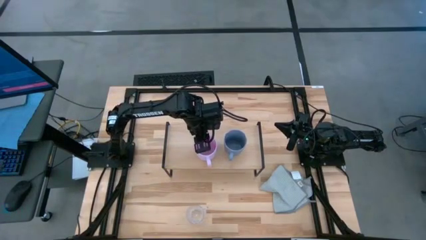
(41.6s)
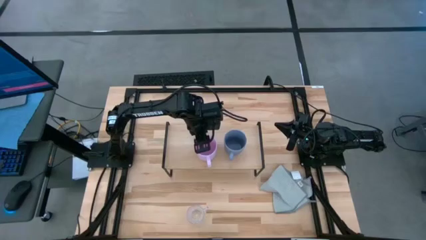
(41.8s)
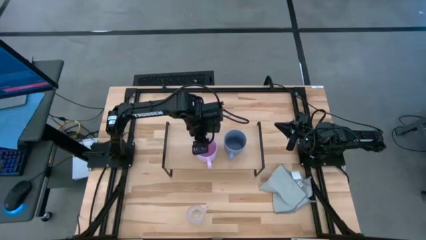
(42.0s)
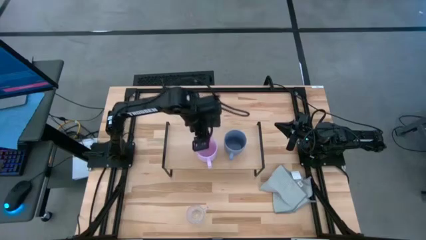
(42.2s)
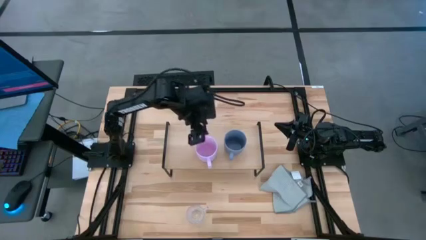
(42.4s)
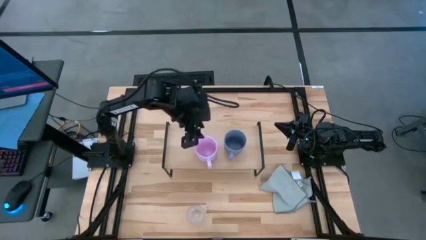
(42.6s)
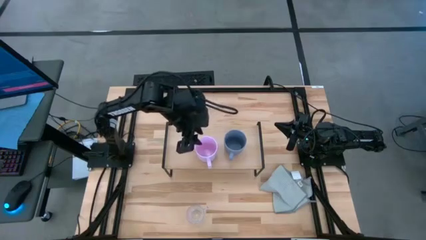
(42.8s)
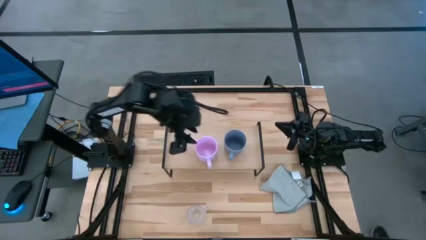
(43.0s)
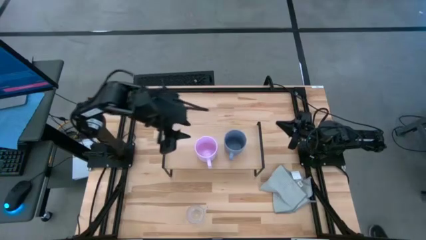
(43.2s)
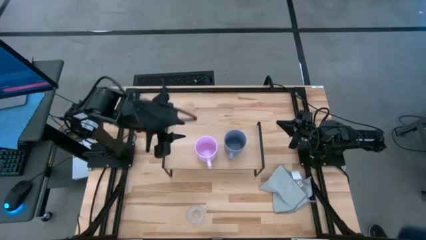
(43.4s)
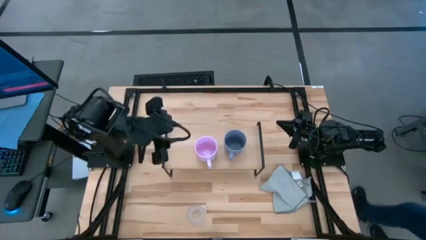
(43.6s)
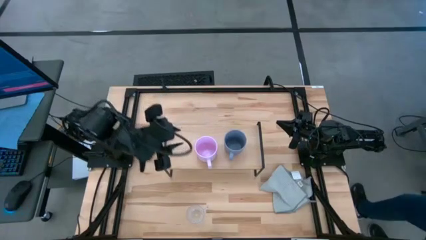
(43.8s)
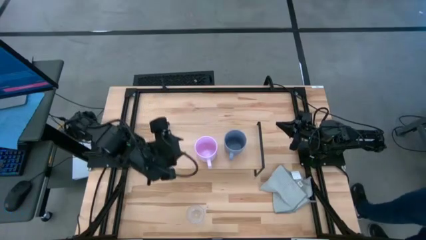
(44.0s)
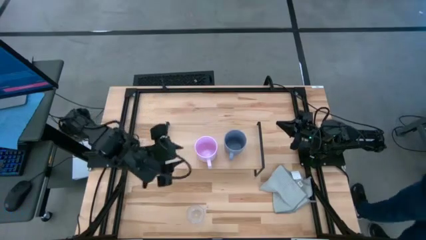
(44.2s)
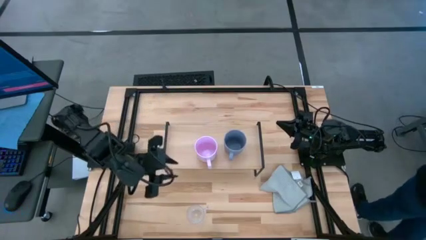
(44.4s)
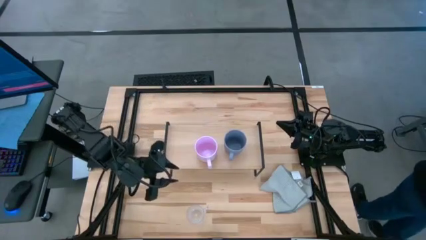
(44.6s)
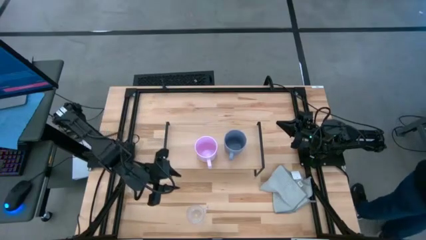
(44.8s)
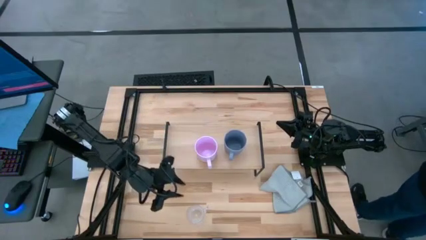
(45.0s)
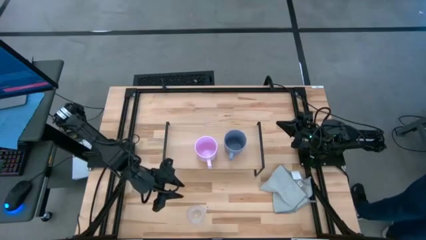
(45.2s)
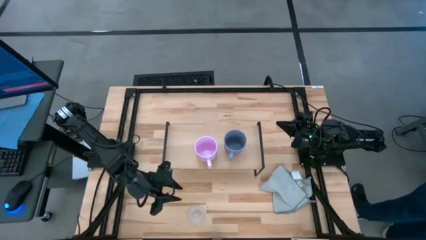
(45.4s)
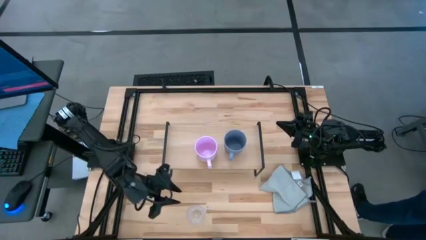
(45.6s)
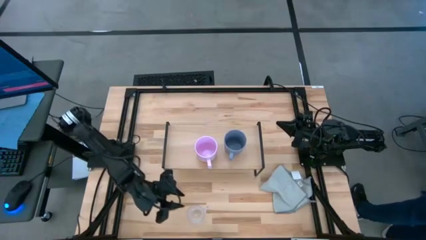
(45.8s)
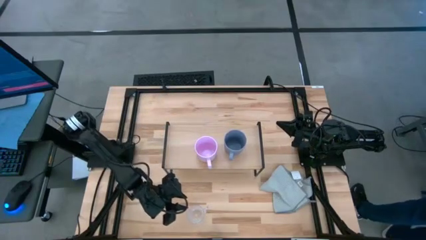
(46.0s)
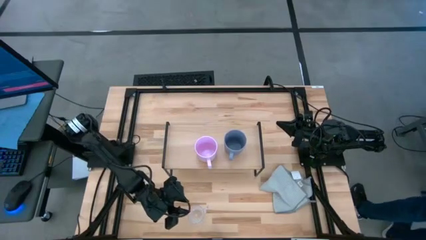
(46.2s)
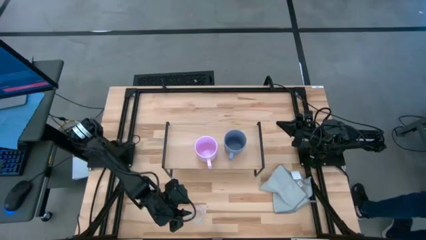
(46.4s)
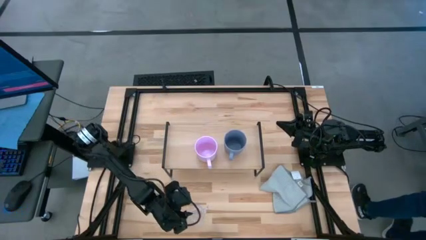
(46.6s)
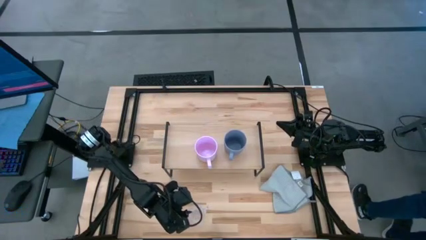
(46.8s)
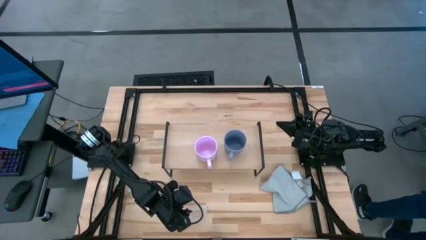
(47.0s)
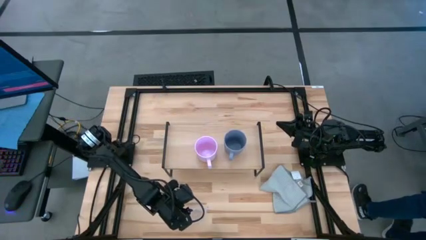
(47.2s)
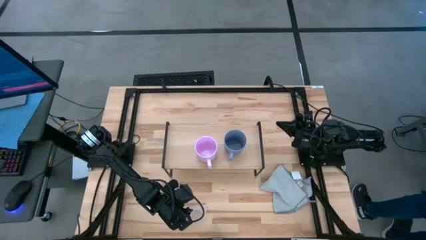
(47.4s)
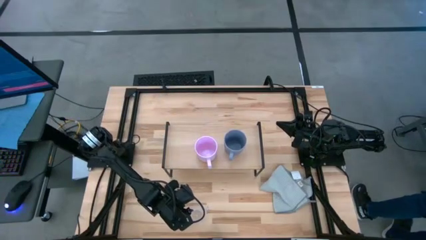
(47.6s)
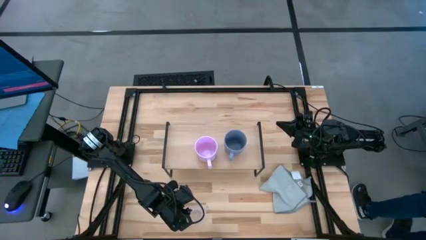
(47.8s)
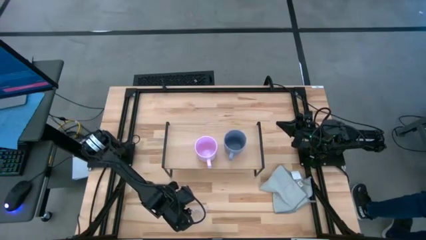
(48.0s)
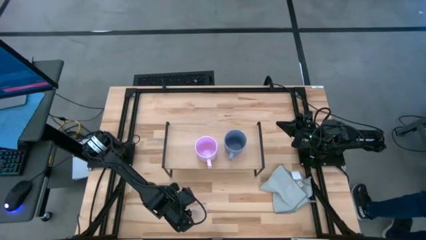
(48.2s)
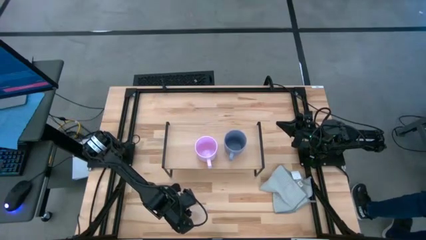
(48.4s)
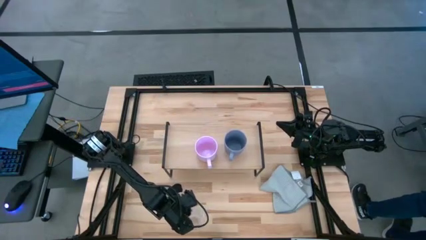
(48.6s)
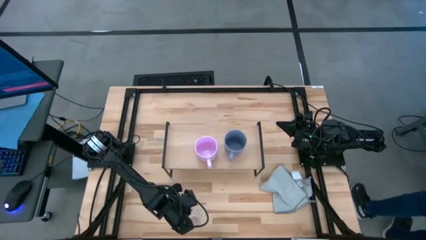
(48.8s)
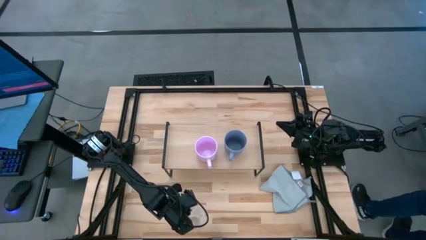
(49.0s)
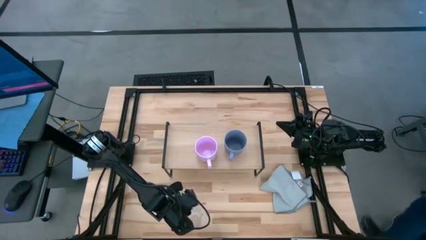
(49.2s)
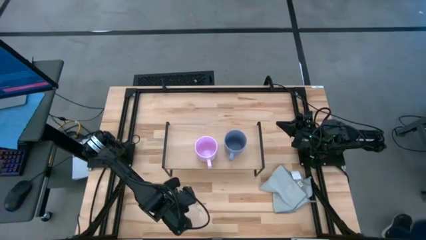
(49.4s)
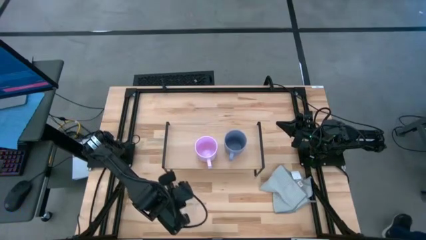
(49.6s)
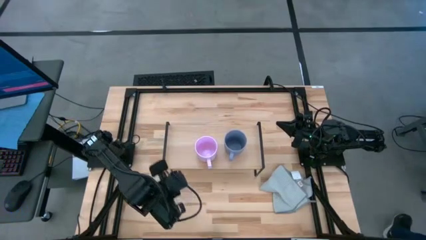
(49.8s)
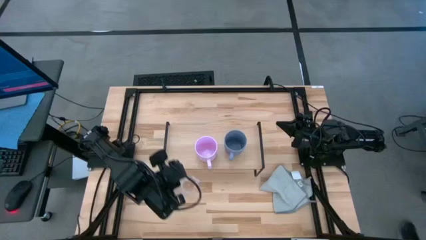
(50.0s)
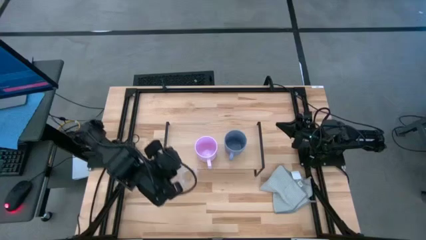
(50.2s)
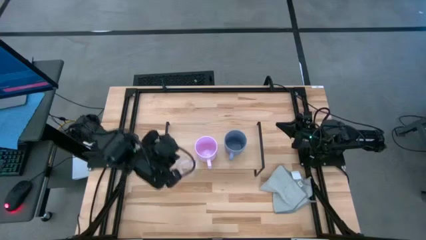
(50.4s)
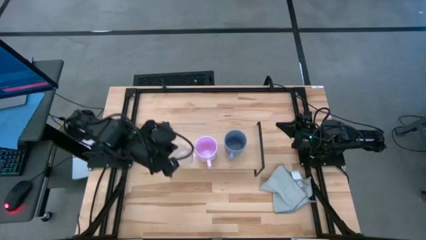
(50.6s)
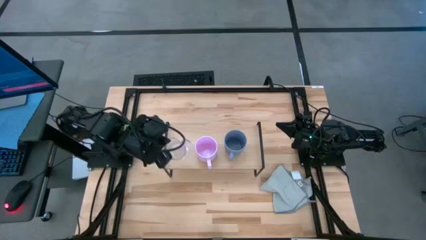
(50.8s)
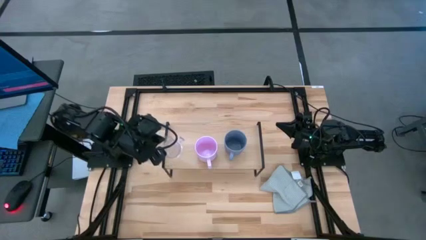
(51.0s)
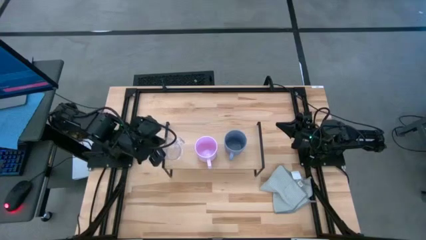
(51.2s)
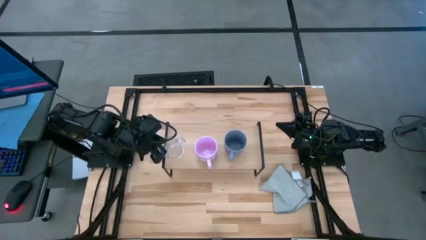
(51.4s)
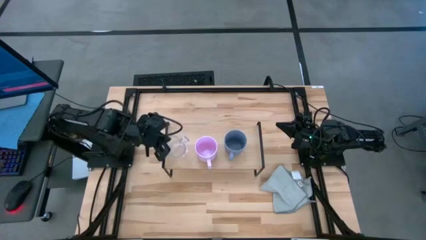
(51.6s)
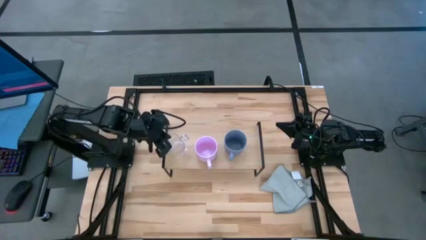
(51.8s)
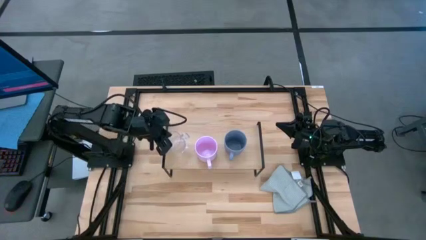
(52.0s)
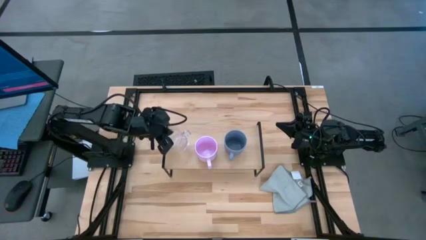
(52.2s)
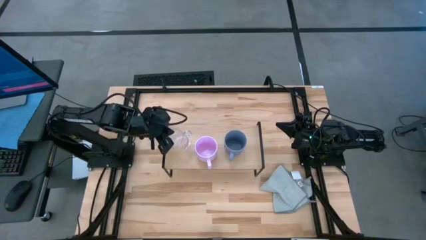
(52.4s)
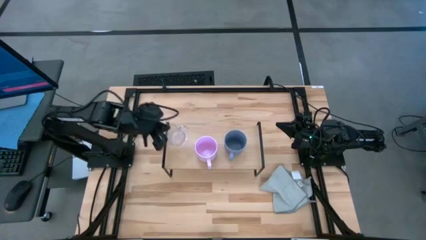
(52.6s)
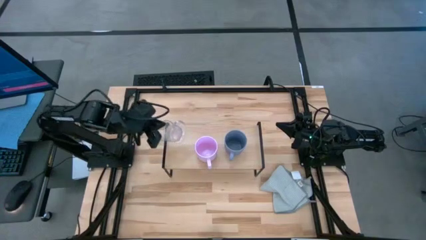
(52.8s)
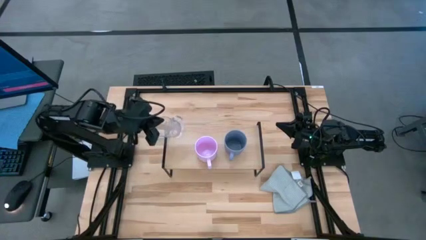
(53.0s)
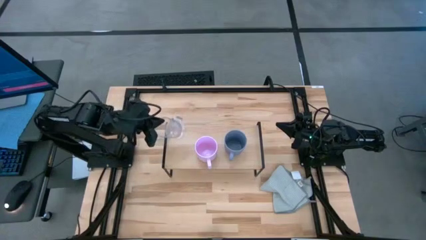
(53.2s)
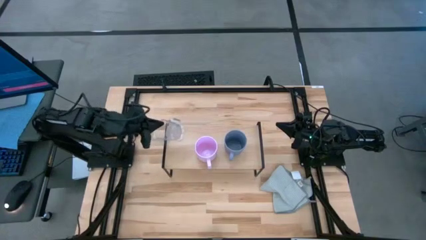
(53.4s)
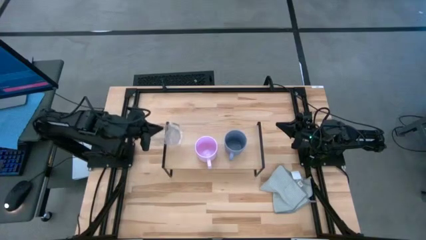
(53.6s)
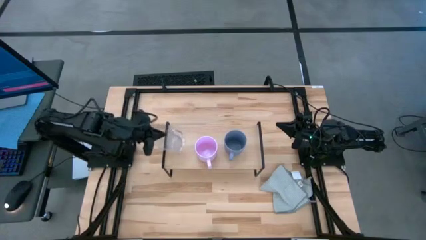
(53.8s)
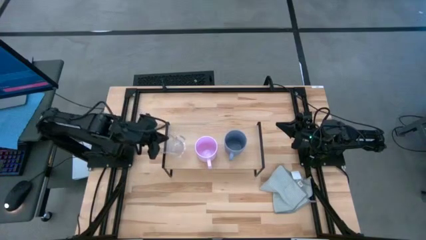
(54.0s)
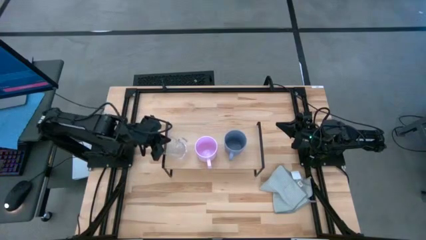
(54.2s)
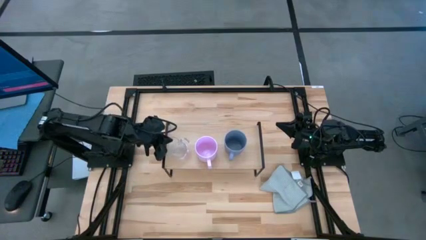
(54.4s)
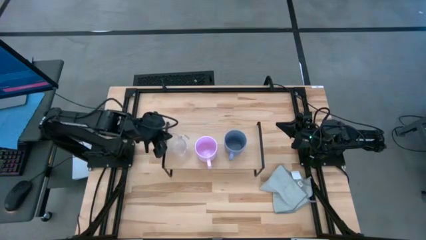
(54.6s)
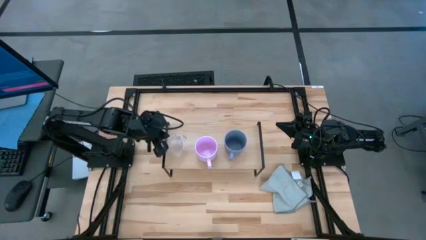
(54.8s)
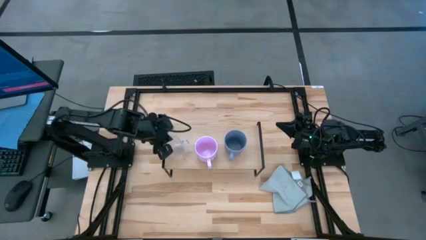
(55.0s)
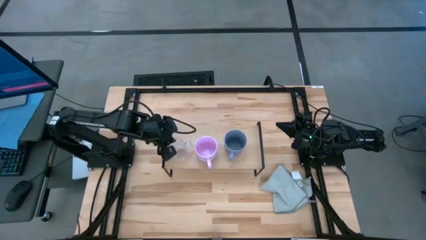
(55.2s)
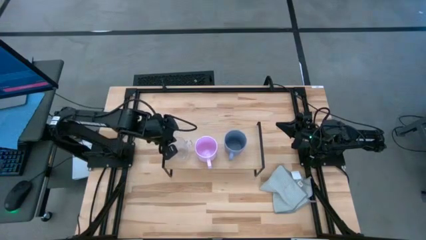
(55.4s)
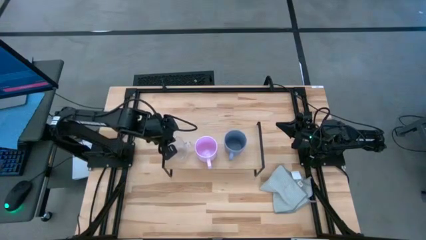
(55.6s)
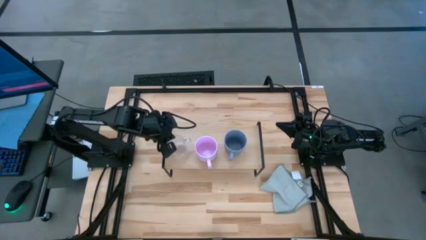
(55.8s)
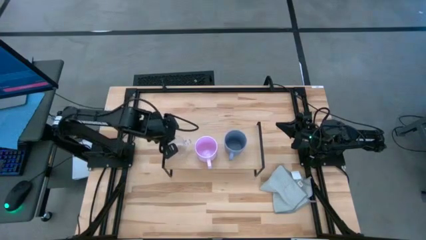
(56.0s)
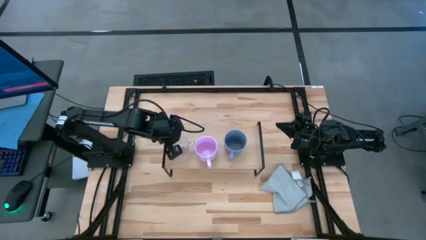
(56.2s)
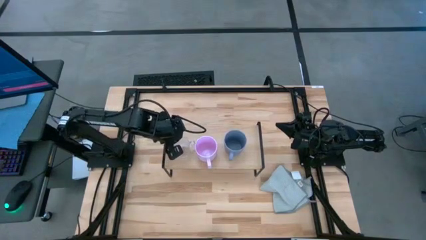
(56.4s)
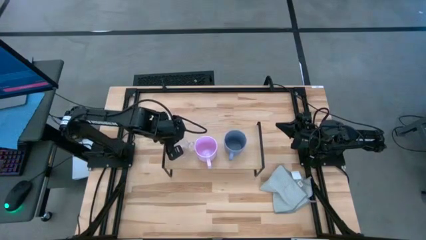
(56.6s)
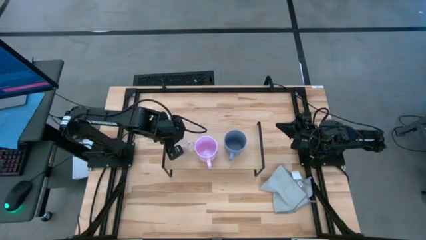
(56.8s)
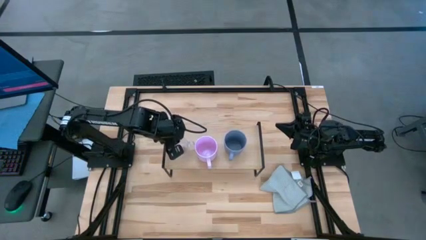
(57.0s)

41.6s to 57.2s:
Task: Stack small to large cups/mugs on shelf
Put the transparent mug on the shelf
